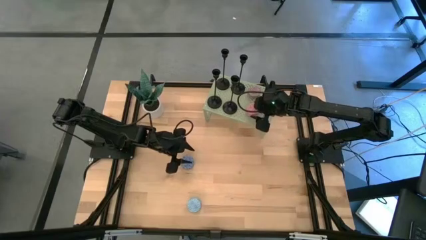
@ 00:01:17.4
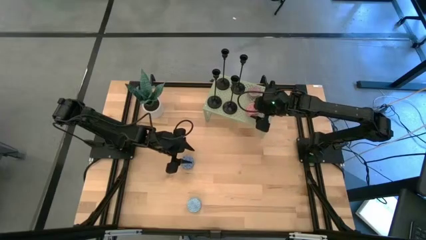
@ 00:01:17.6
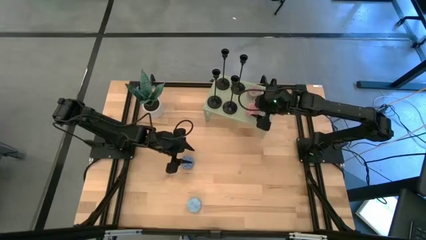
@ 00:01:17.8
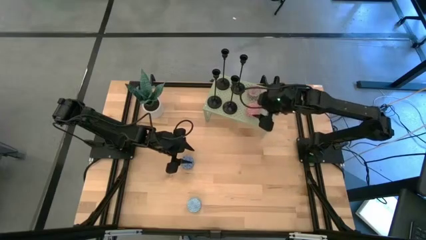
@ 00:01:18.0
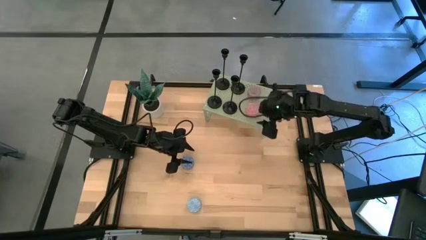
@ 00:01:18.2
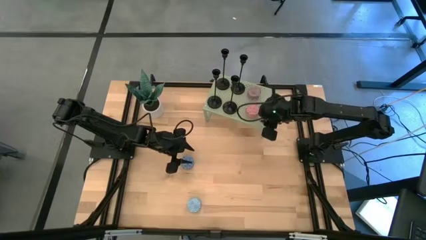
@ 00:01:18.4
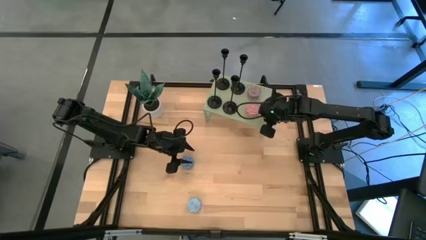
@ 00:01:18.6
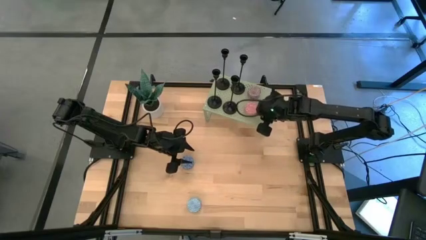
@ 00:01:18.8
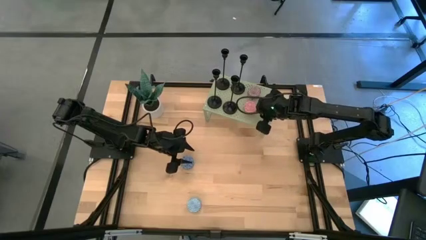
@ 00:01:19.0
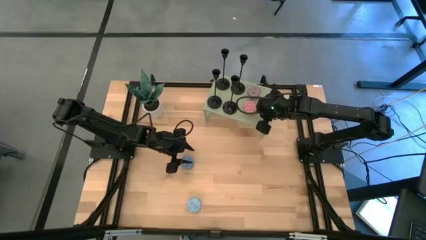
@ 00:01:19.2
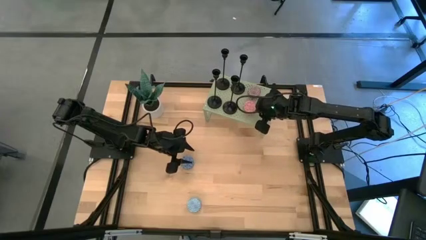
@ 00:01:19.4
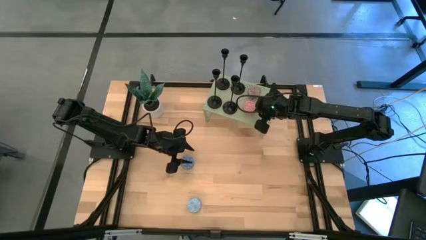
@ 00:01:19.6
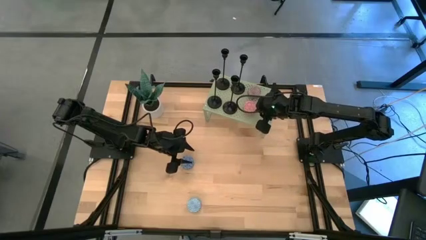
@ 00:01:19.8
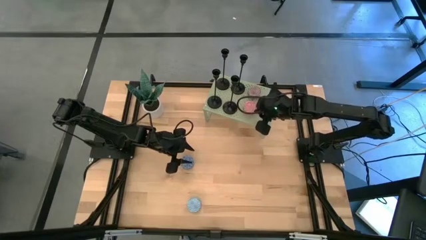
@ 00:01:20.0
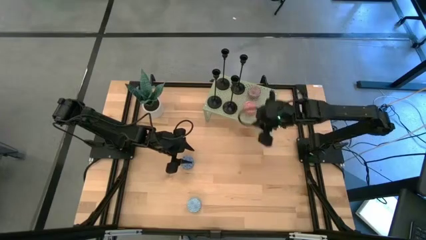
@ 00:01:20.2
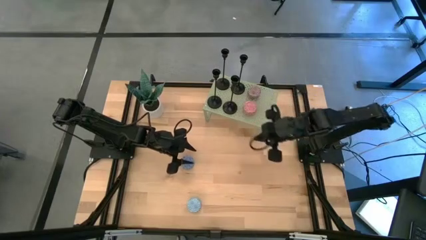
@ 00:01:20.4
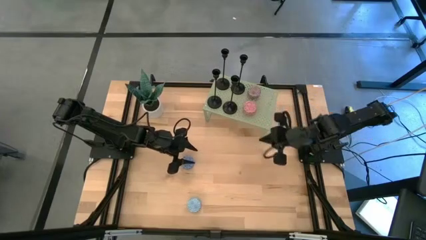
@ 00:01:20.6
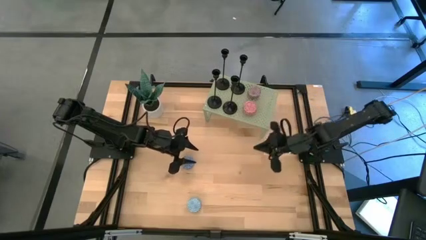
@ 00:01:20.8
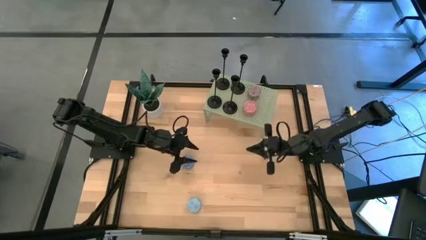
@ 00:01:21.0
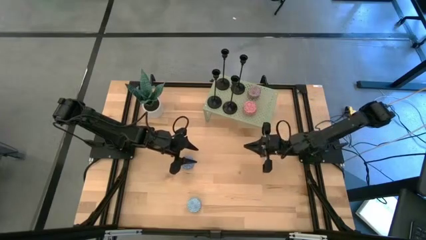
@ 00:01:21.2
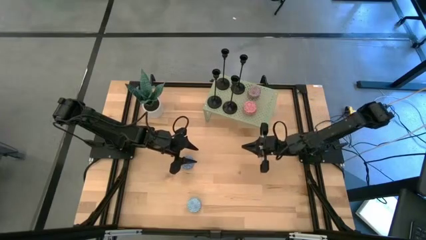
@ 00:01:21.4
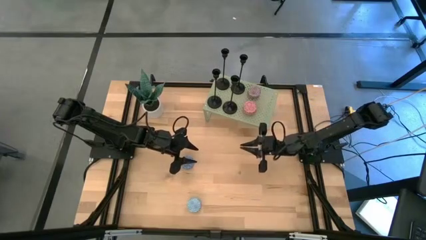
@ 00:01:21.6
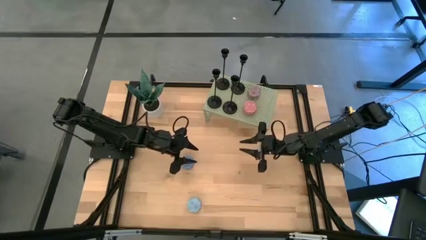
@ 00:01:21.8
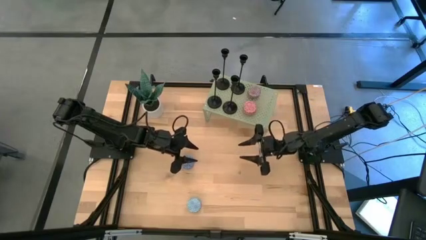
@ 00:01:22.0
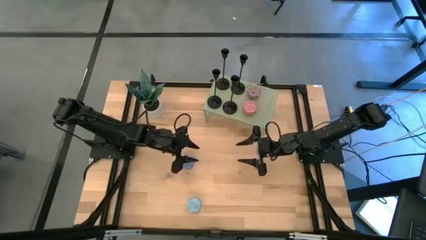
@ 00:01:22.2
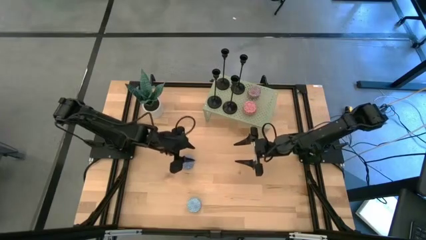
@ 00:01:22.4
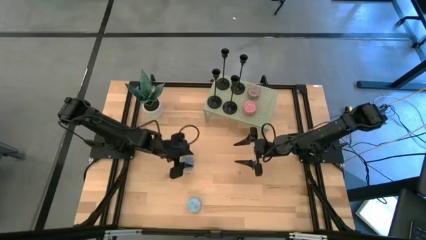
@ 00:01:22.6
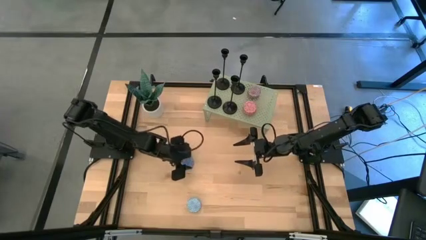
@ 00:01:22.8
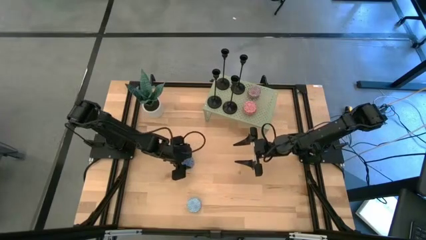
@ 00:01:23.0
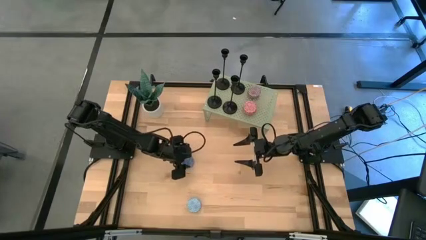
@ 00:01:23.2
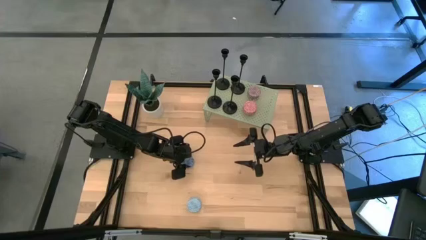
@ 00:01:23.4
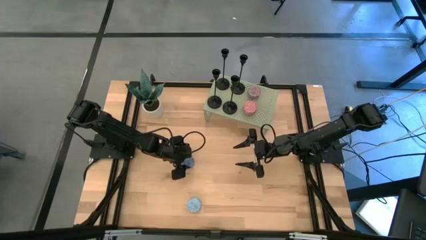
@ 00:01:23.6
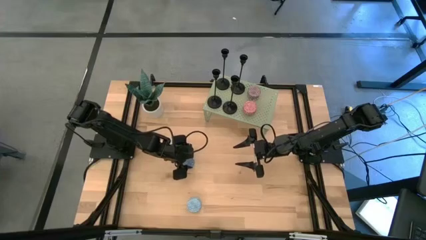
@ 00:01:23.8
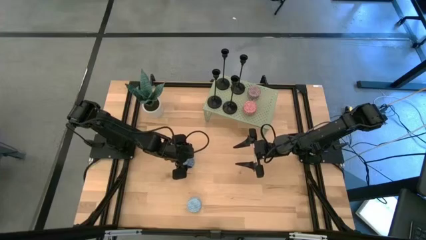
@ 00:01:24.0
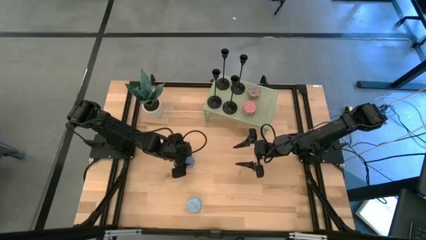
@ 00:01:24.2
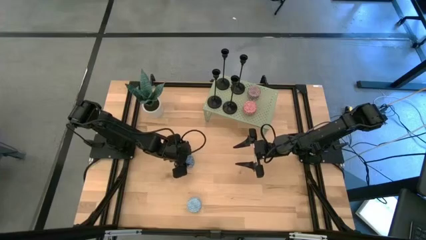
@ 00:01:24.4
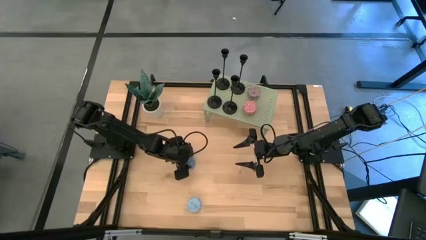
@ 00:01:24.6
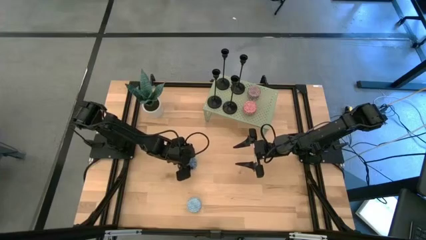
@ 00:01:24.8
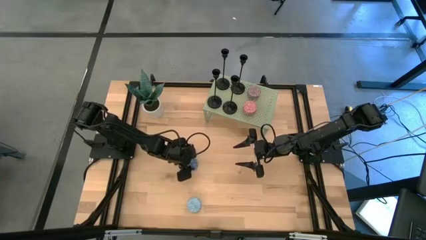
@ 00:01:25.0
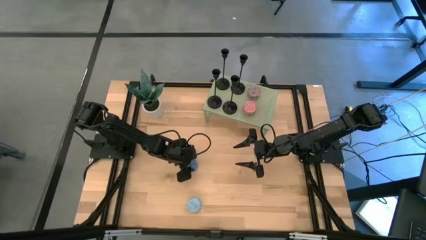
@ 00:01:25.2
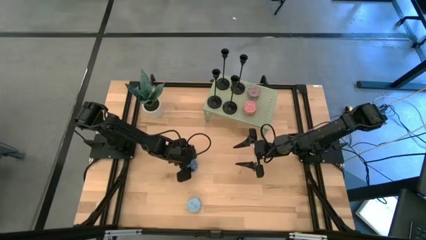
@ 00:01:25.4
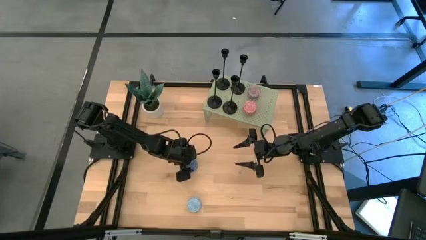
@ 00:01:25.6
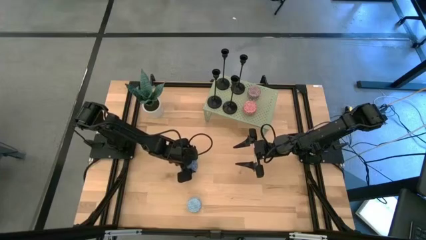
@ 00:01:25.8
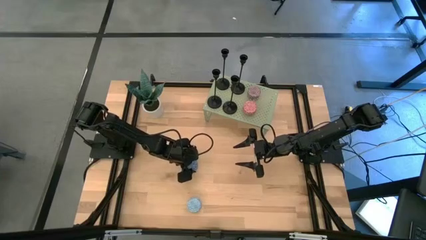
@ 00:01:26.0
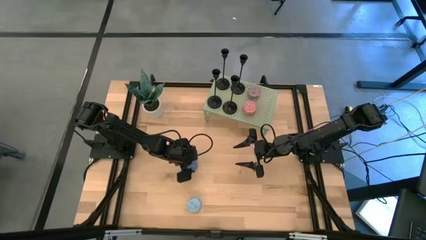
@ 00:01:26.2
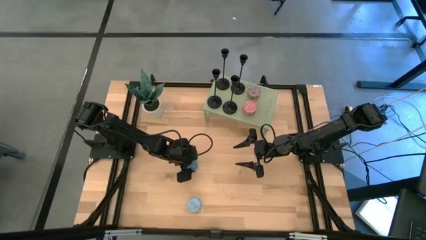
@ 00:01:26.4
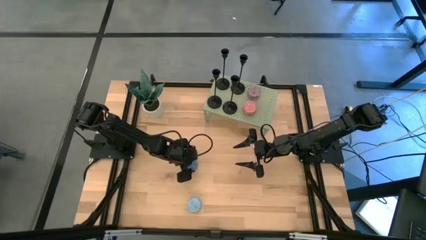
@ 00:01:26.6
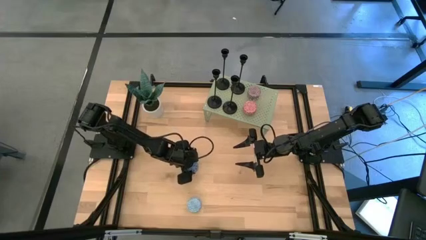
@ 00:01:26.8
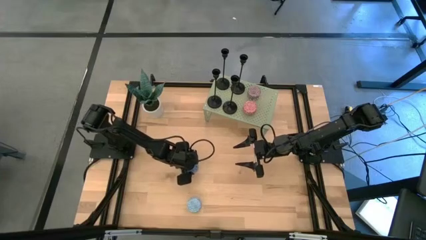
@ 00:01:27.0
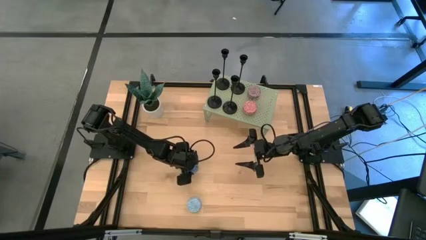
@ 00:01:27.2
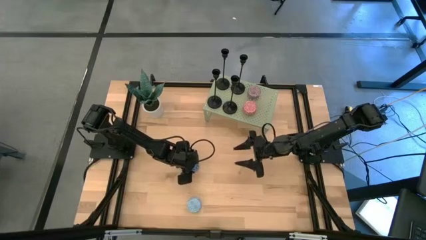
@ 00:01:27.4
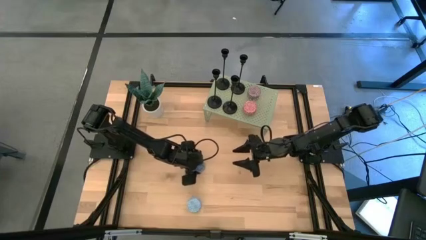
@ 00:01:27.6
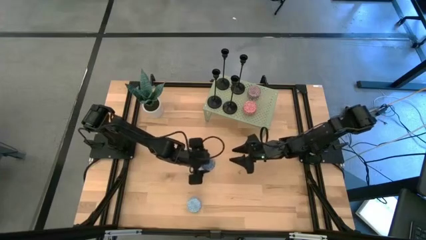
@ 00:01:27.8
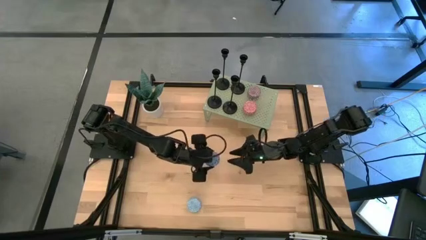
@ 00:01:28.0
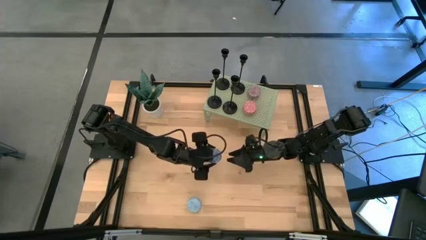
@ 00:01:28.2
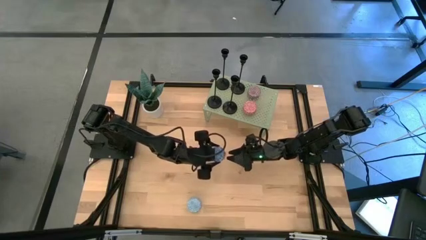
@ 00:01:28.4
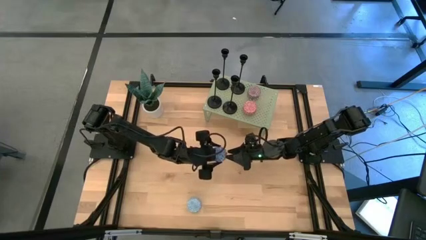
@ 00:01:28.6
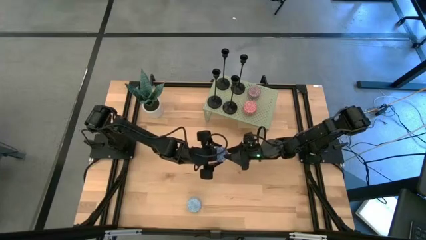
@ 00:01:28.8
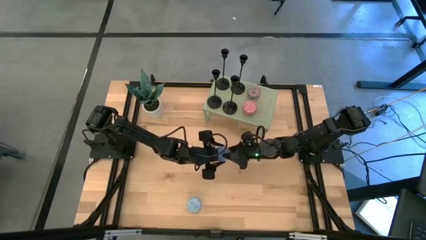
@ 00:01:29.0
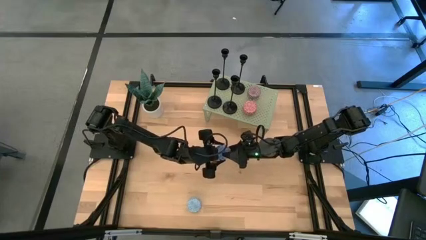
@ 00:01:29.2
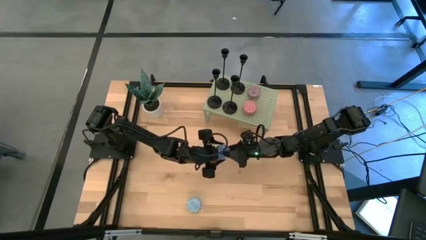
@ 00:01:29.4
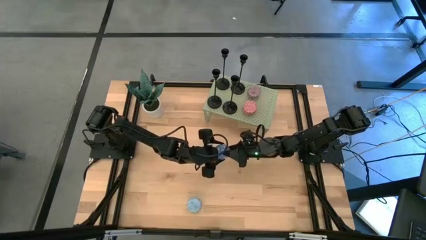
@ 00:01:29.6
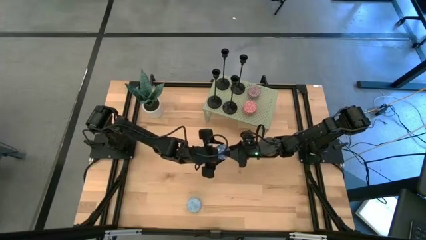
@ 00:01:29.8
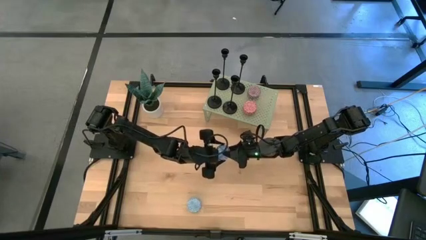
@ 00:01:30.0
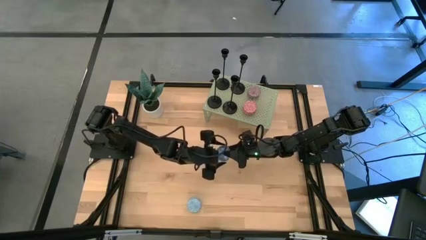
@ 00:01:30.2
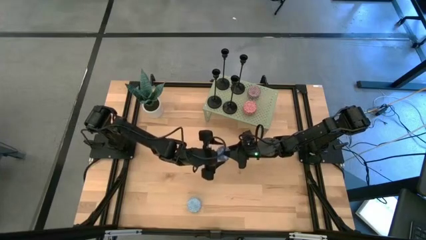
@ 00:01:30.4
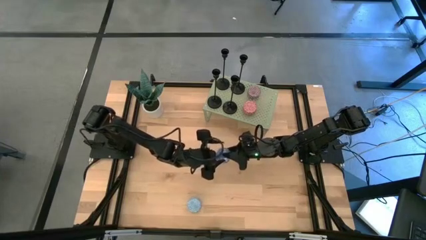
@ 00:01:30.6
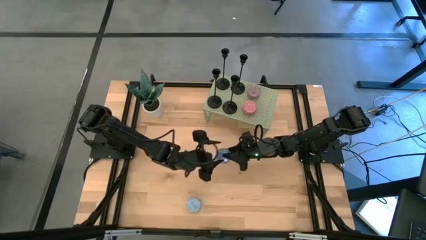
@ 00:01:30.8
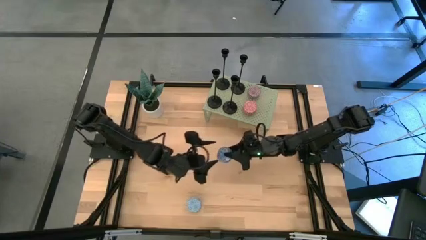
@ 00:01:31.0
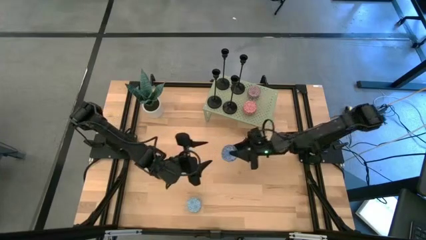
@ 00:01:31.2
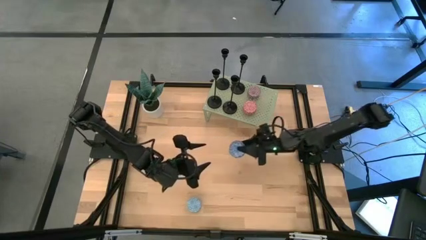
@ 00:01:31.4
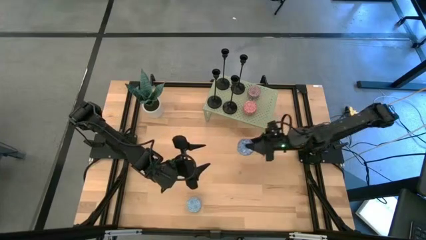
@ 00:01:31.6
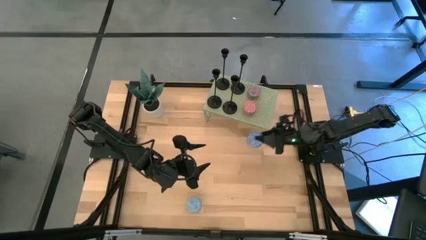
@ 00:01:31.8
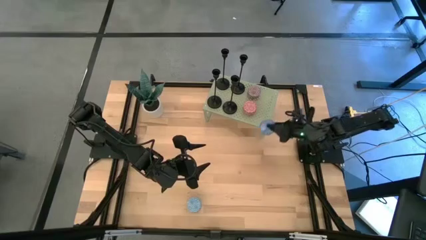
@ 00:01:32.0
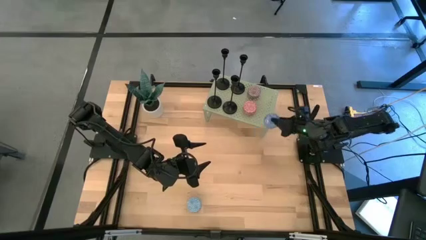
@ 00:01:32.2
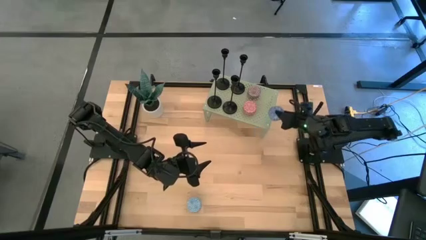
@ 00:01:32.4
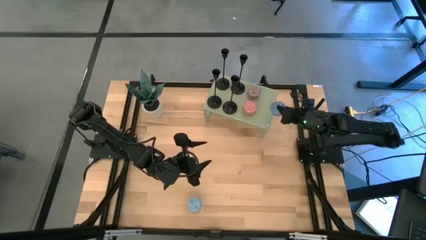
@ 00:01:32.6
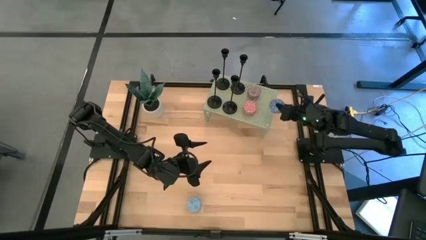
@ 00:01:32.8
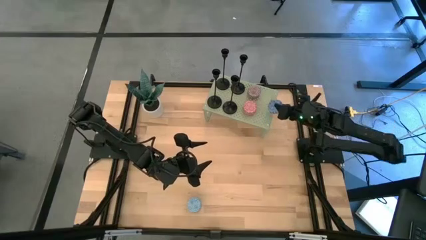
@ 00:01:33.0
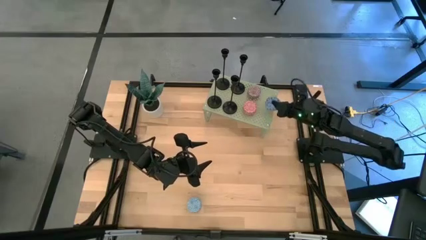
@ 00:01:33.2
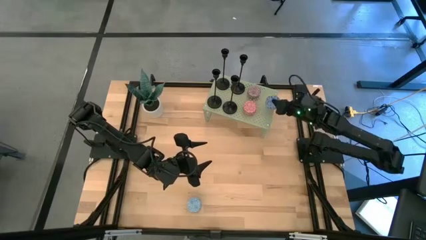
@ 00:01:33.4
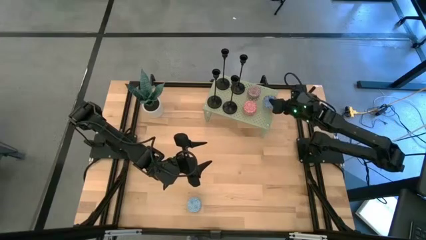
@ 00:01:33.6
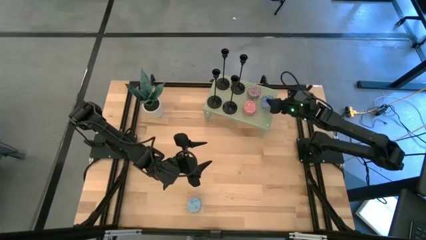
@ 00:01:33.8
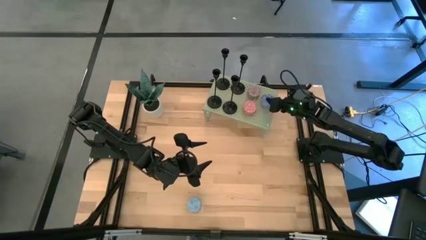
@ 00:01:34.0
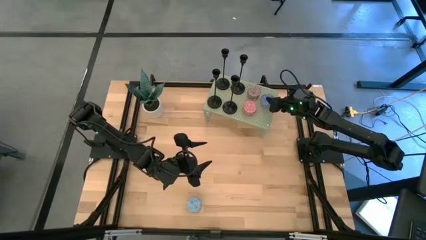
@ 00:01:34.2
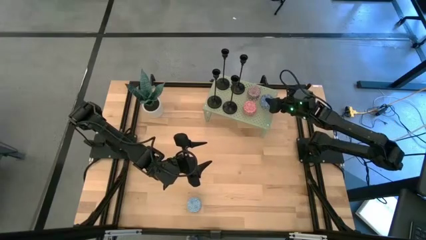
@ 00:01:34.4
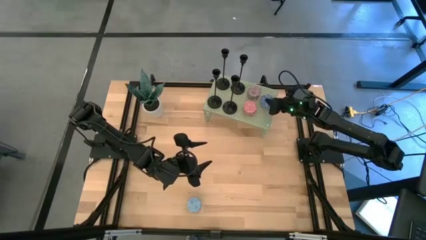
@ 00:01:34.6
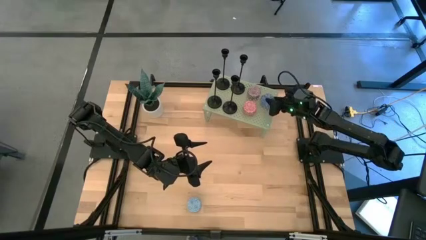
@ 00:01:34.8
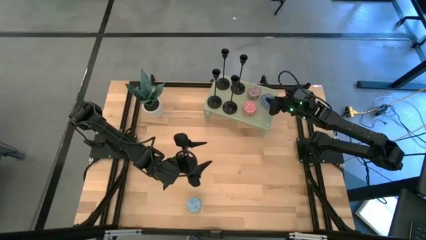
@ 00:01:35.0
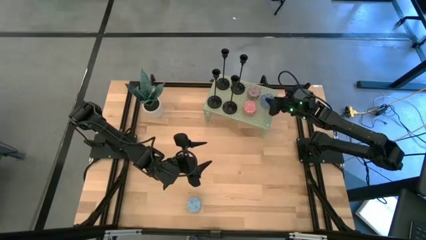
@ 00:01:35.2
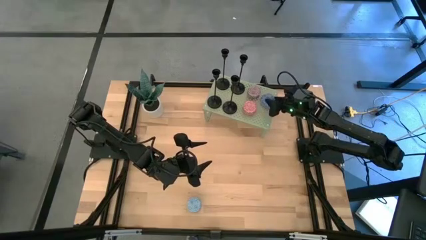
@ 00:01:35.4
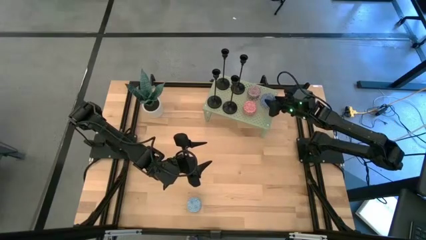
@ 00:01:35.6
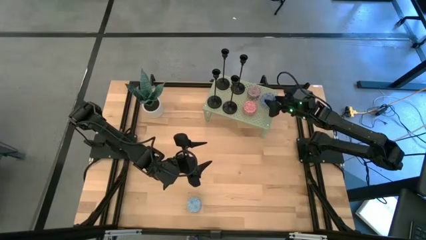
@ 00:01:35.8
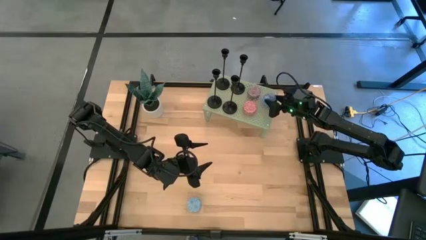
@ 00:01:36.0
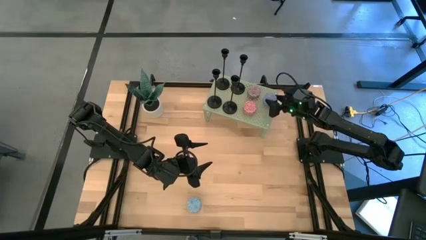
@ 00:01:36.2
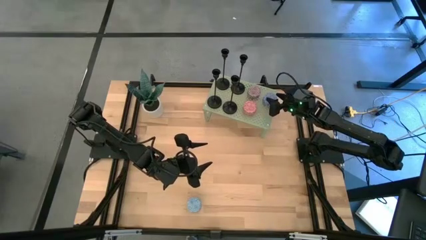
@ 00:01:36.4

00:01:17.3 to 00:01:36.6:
Task: Pick & Place candle stick holders
Put the blue scented candle on the shelf
